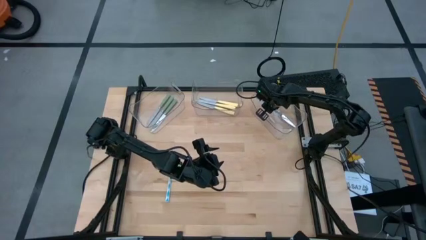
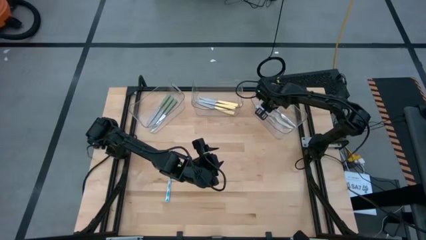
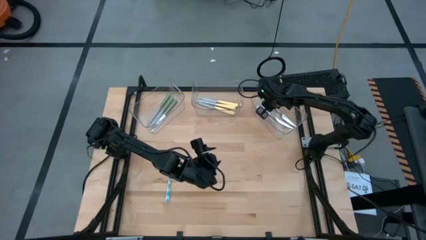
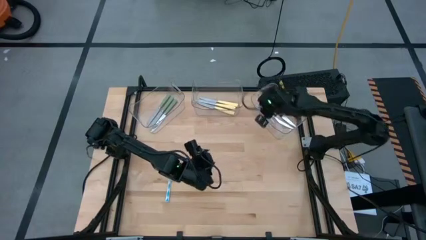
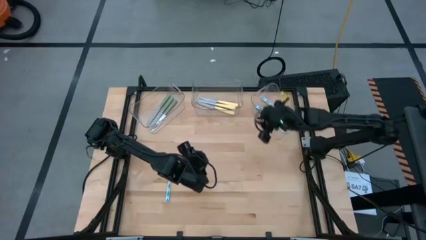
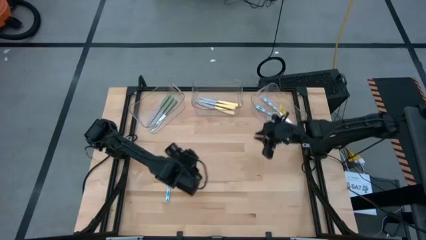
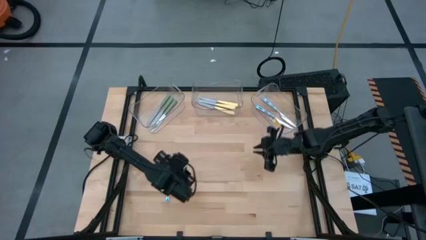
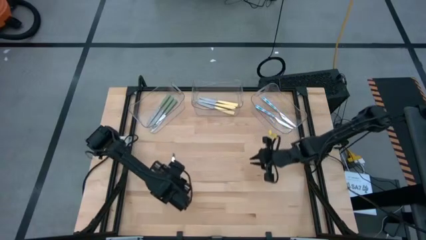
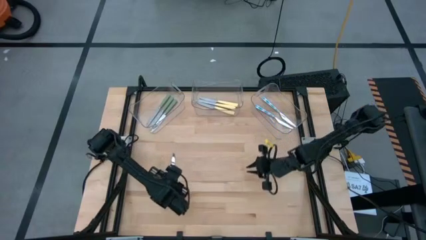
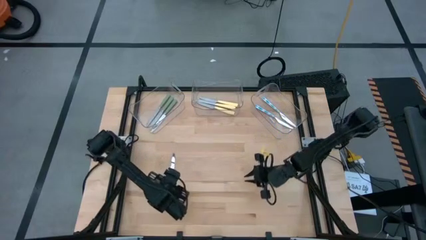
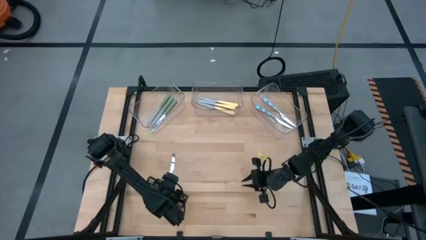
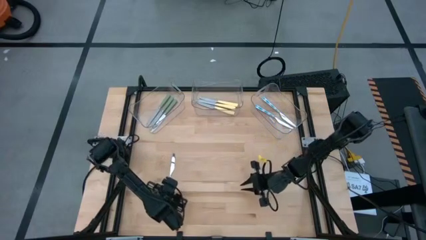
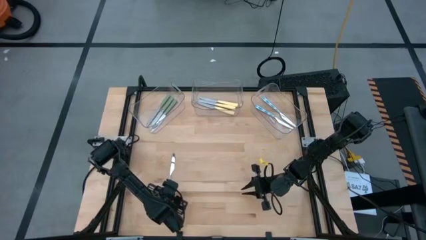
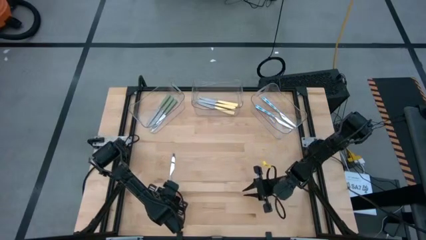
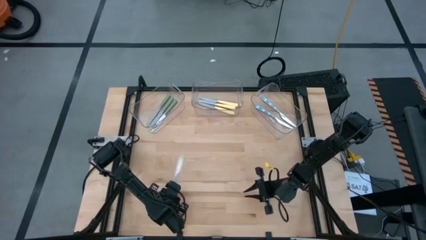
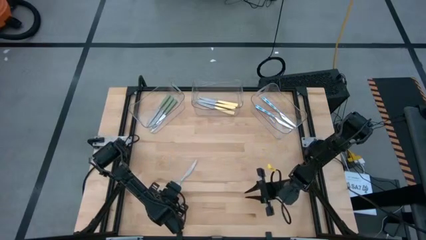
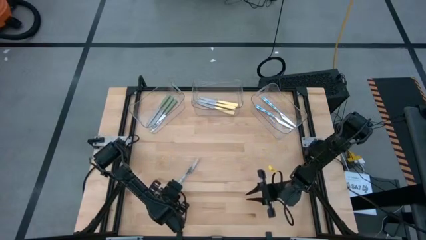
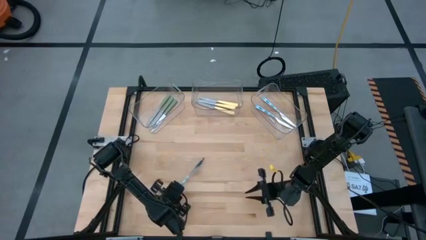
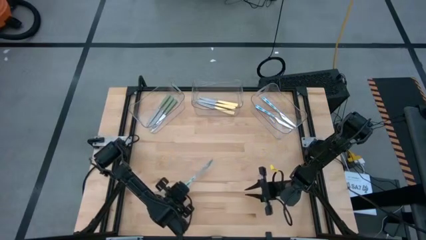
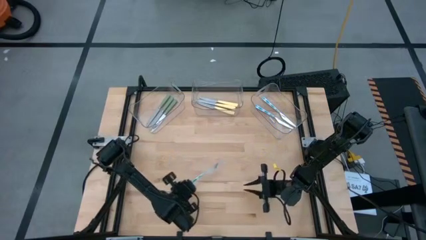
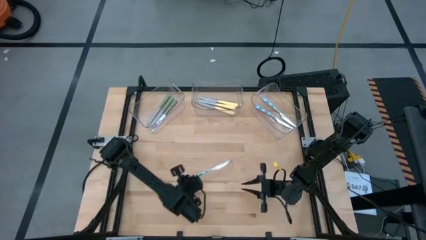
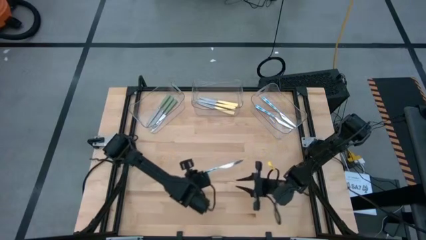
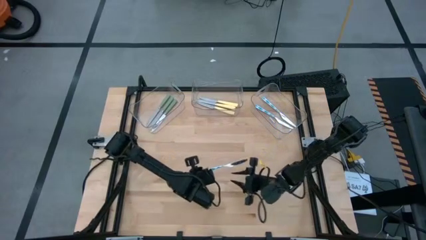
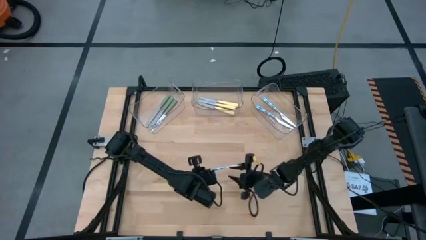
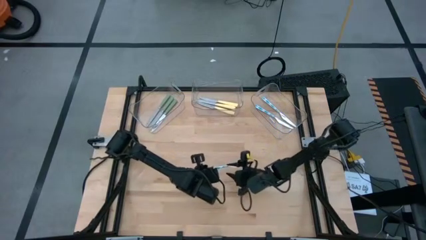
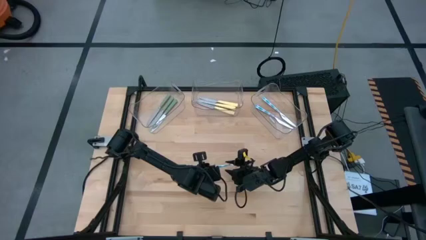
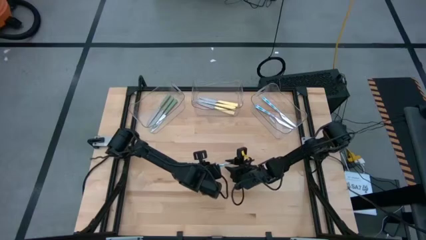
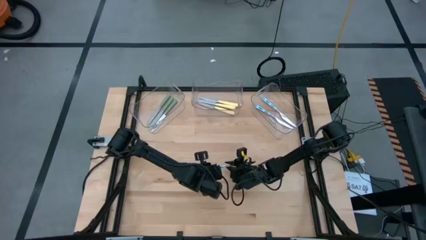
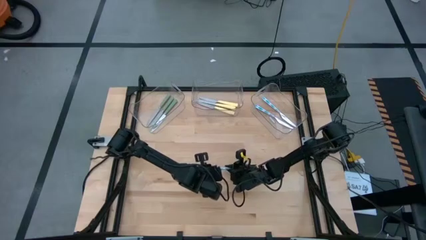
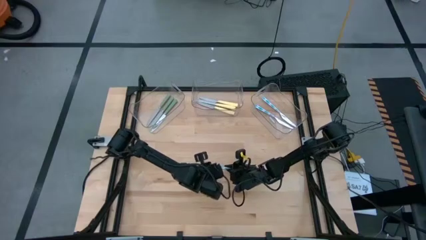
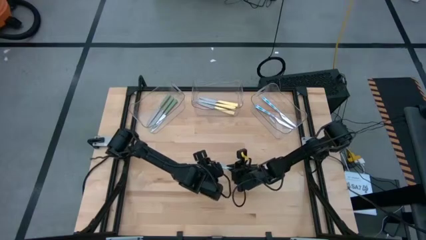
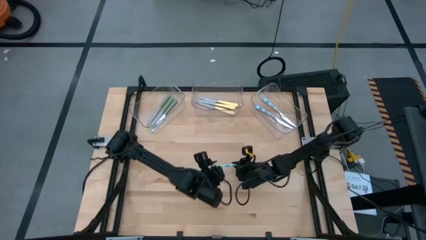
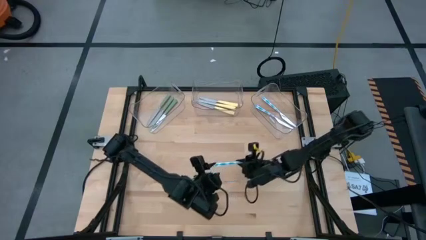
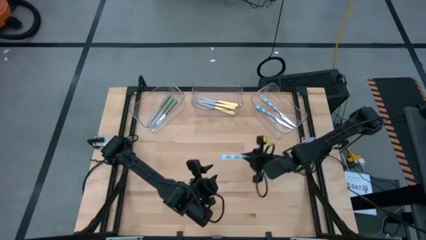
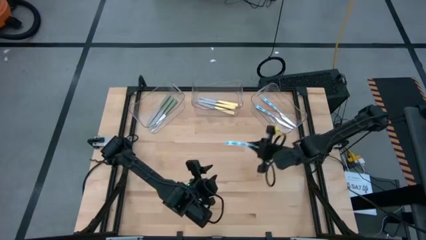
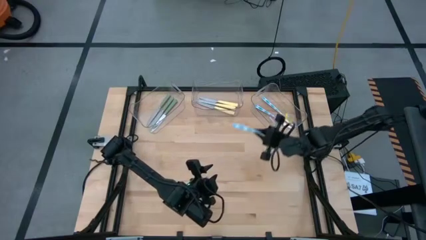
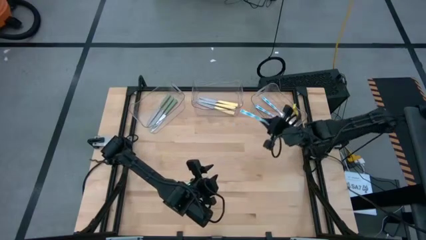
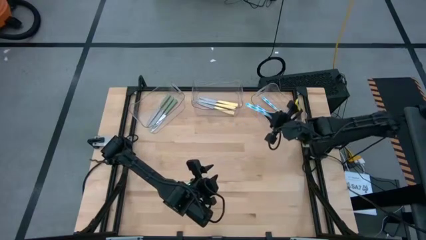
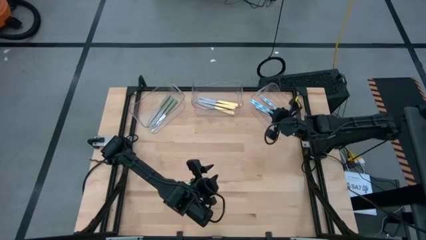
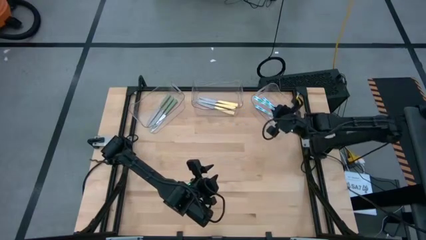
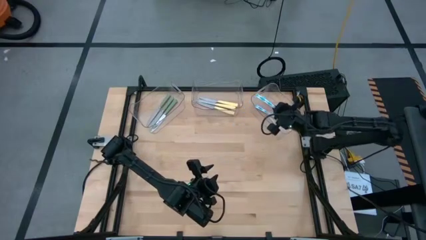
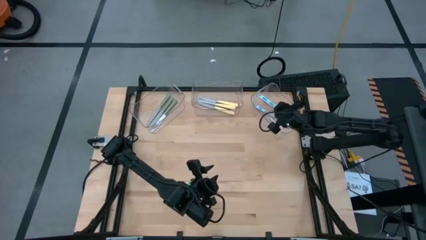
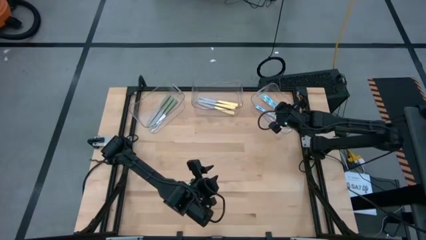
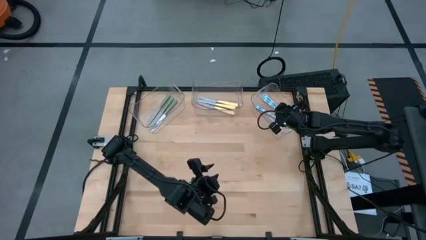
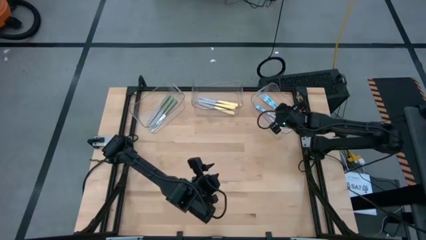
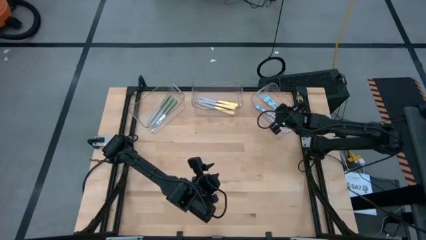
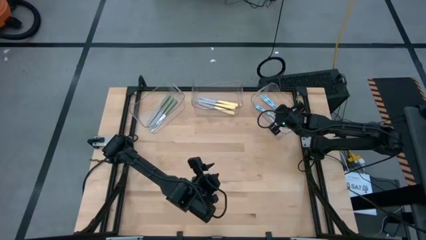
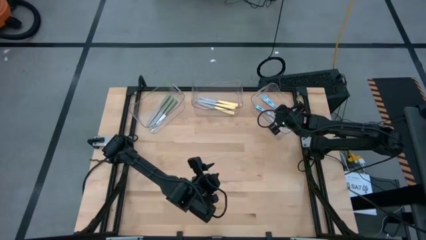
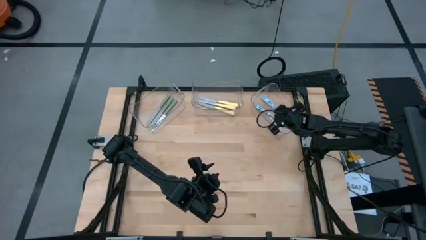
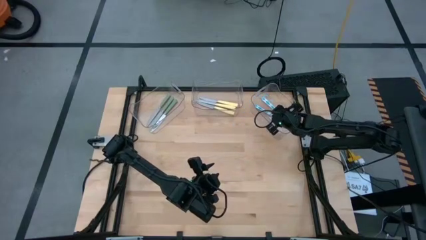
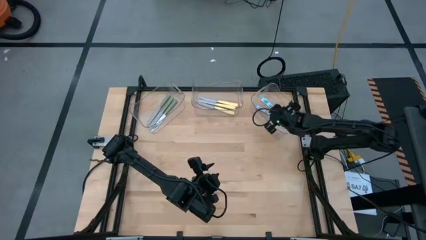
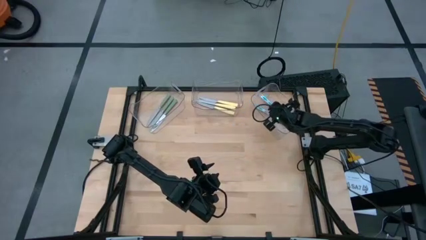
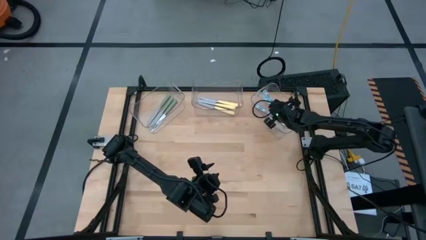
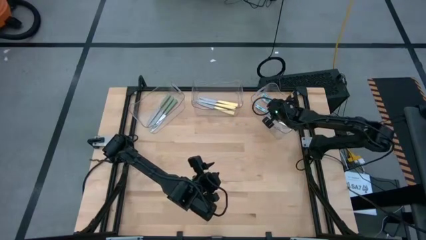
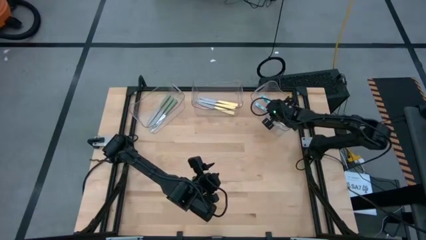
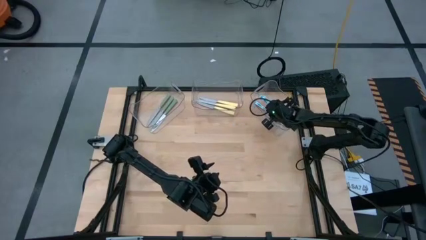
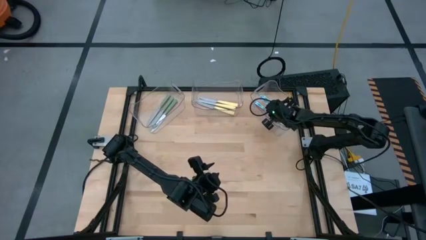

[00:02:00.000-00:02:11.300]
Task: Sort silverware by color (type)
Put the blue table knife into the right transparent bin
